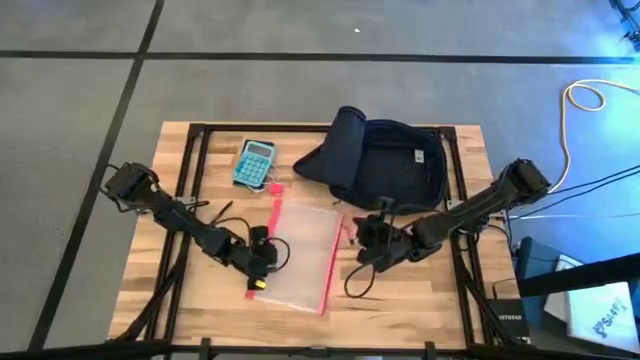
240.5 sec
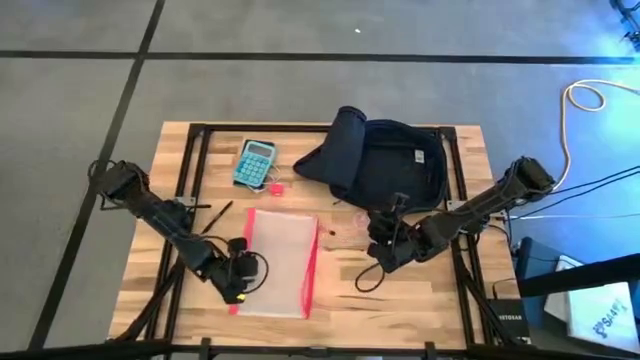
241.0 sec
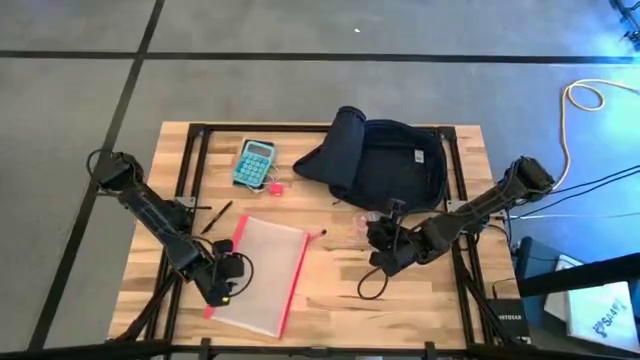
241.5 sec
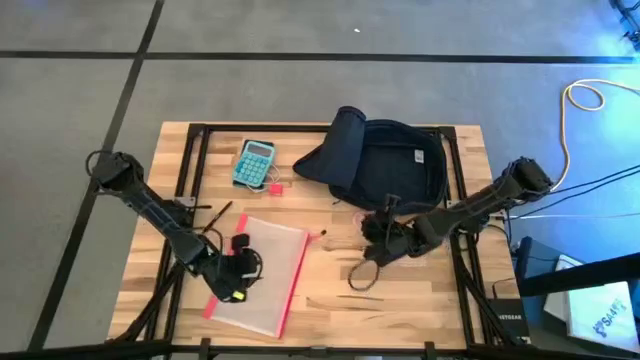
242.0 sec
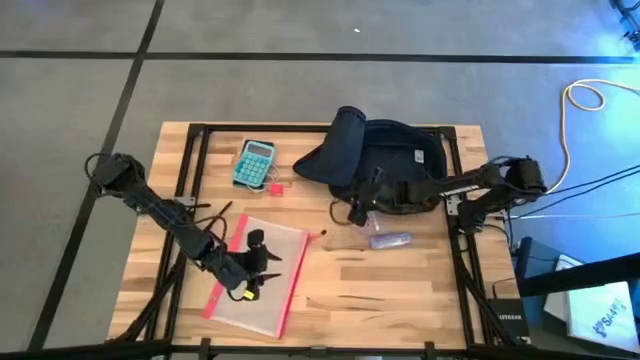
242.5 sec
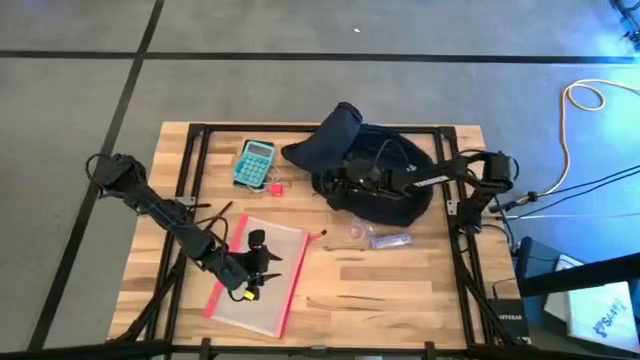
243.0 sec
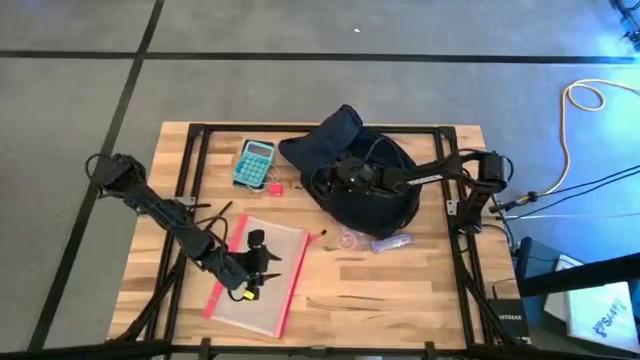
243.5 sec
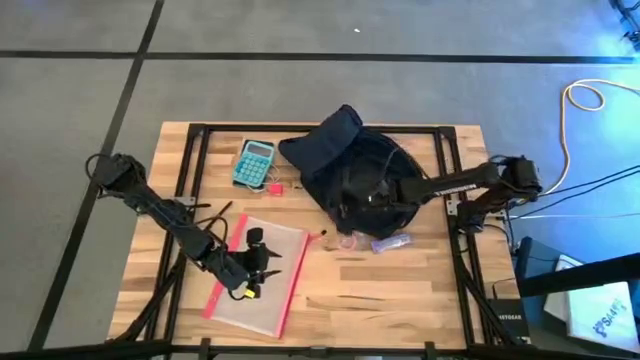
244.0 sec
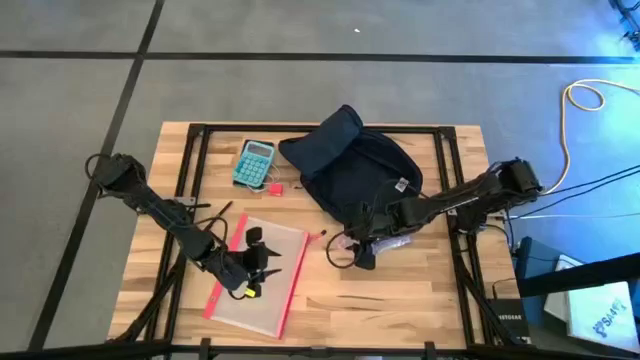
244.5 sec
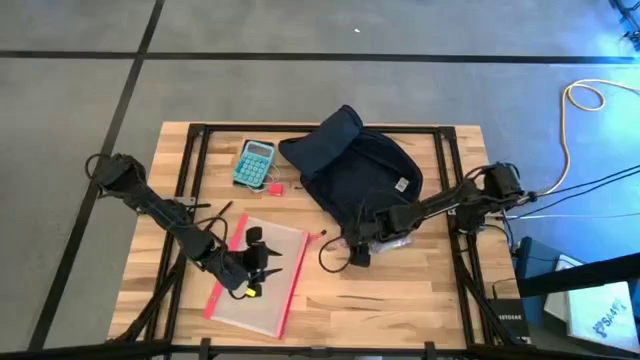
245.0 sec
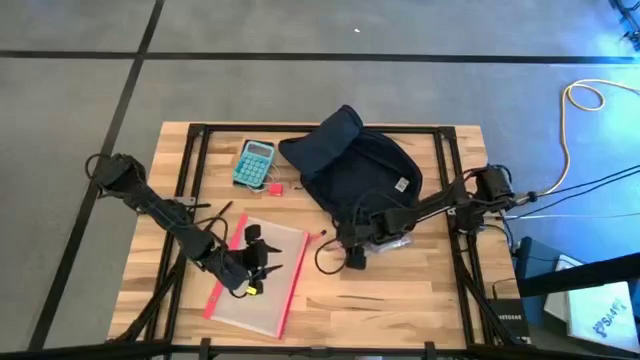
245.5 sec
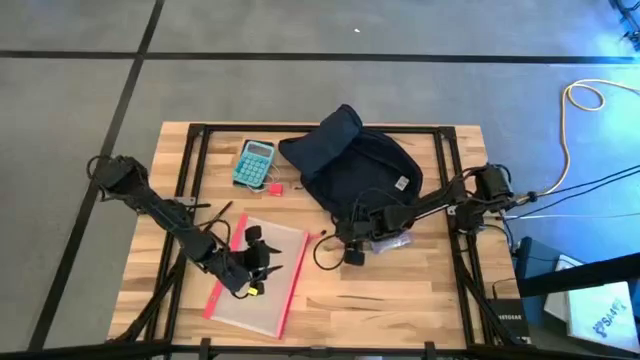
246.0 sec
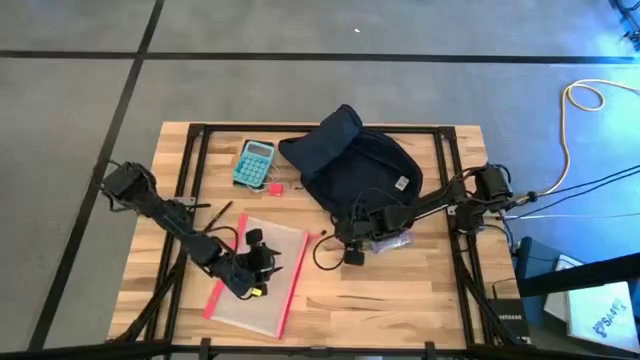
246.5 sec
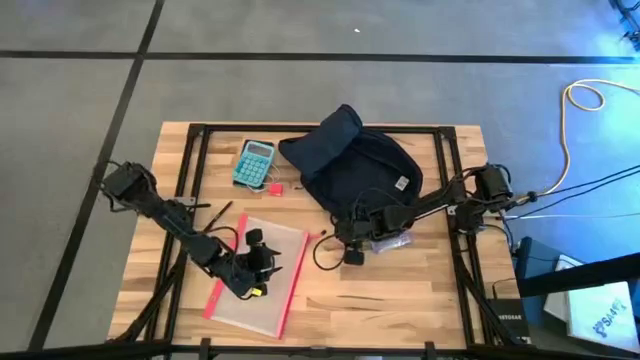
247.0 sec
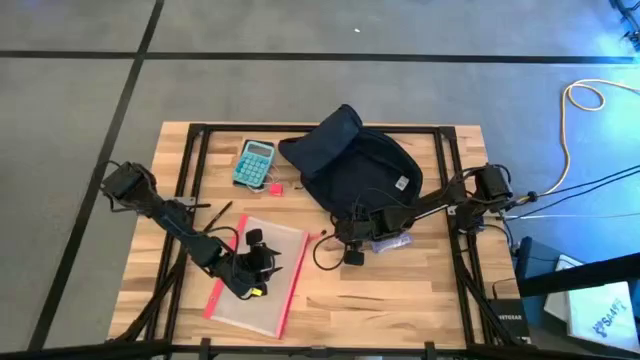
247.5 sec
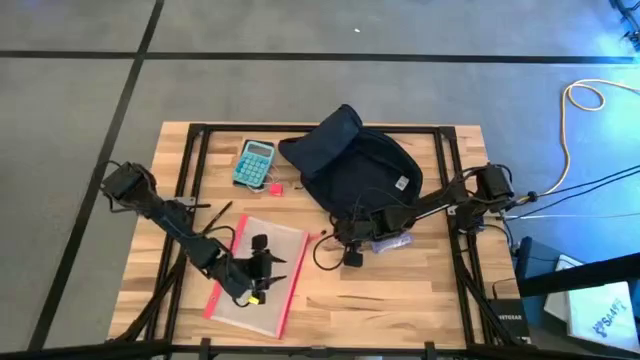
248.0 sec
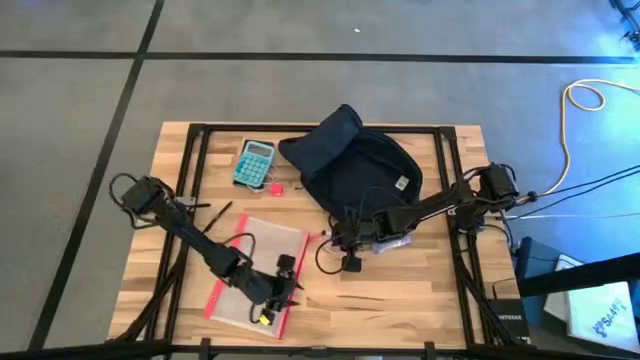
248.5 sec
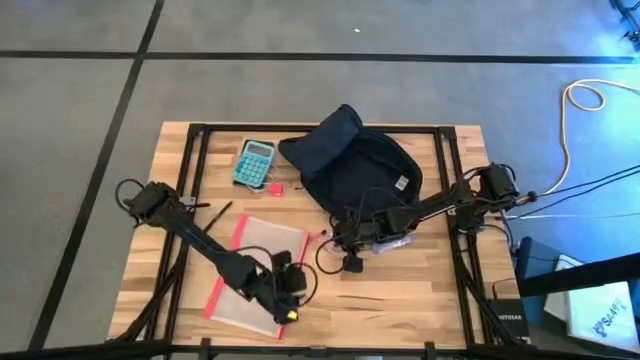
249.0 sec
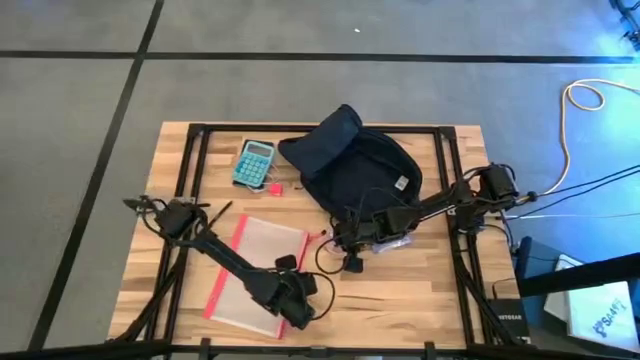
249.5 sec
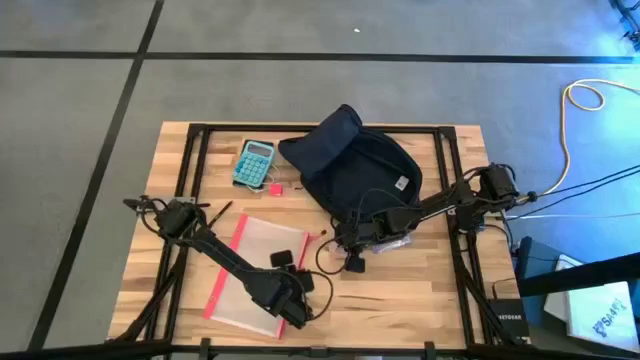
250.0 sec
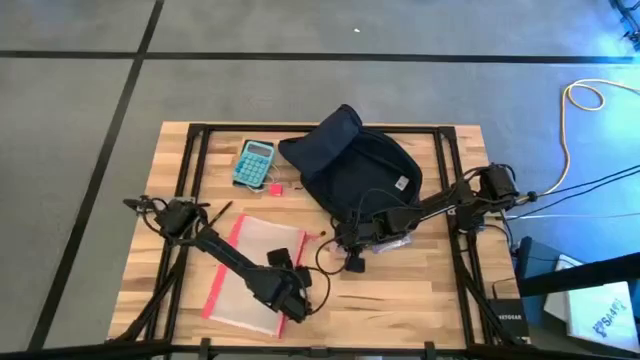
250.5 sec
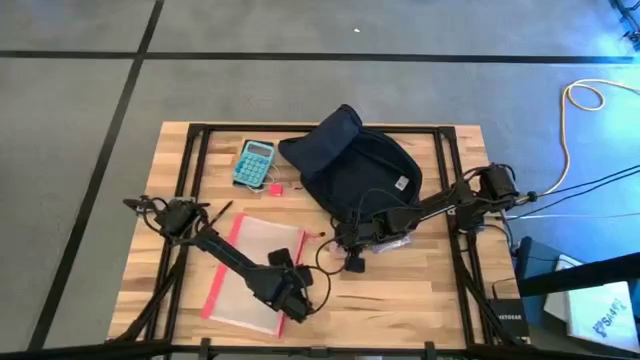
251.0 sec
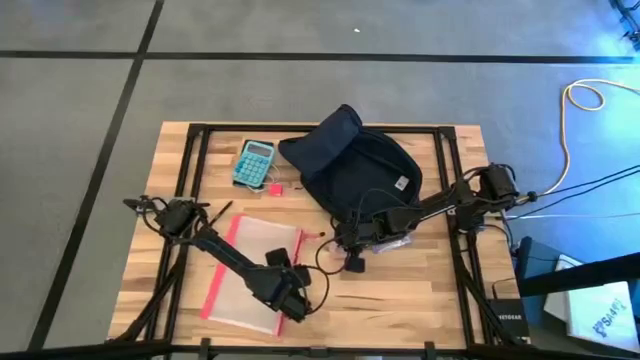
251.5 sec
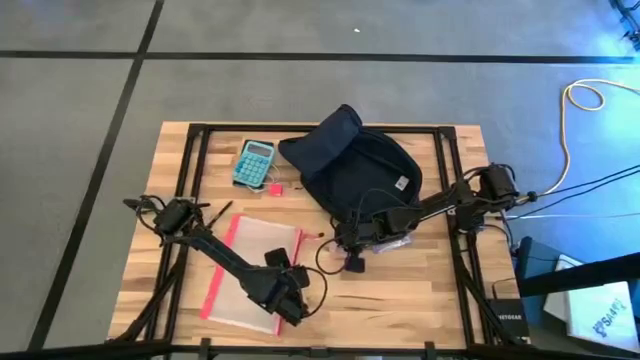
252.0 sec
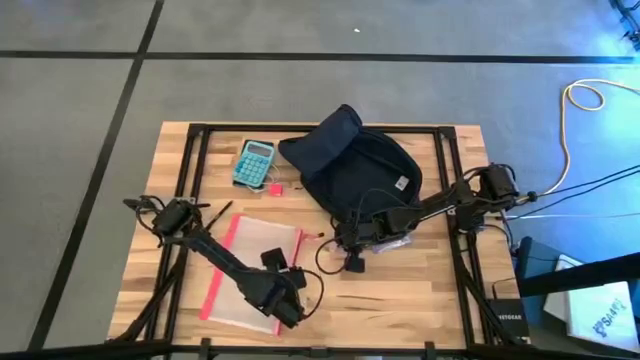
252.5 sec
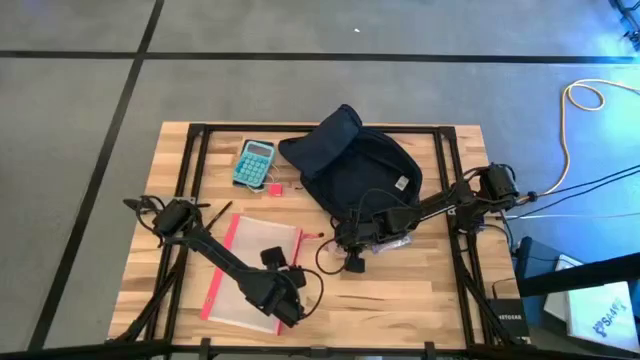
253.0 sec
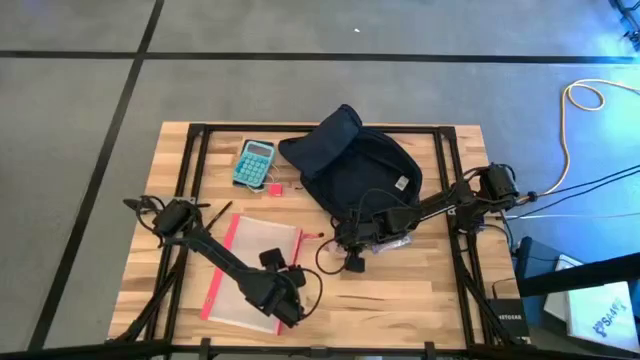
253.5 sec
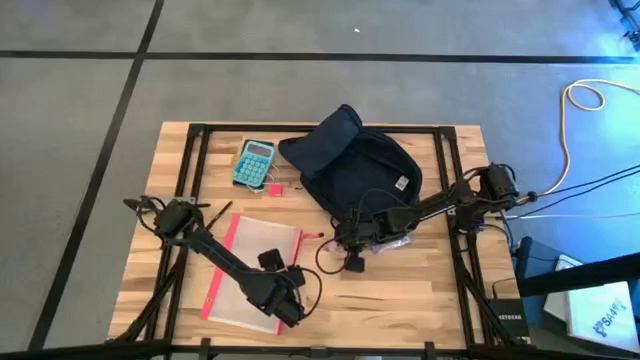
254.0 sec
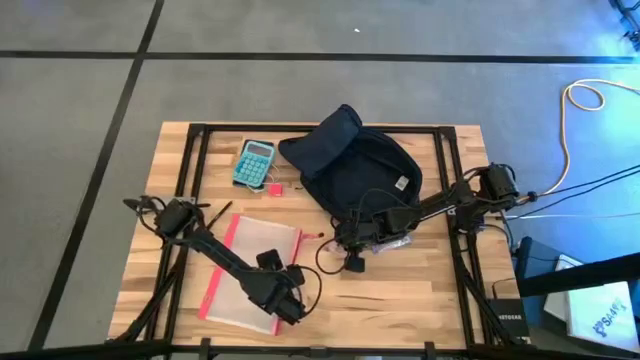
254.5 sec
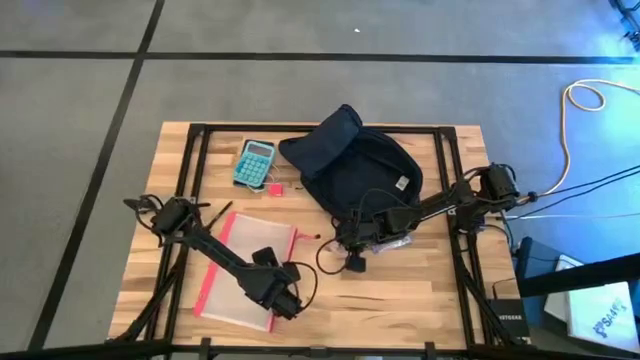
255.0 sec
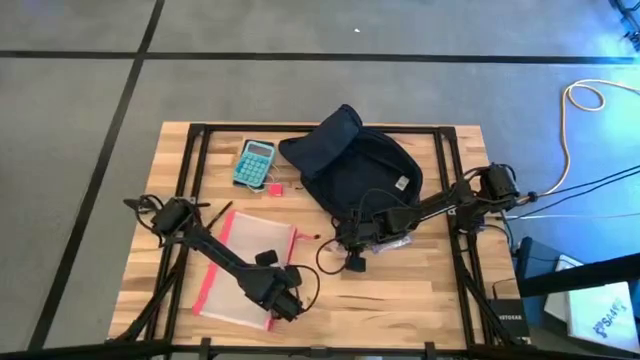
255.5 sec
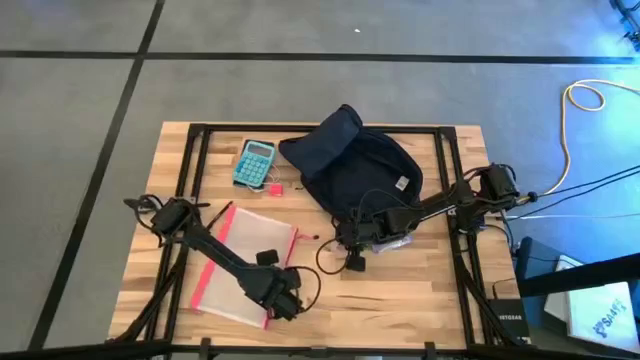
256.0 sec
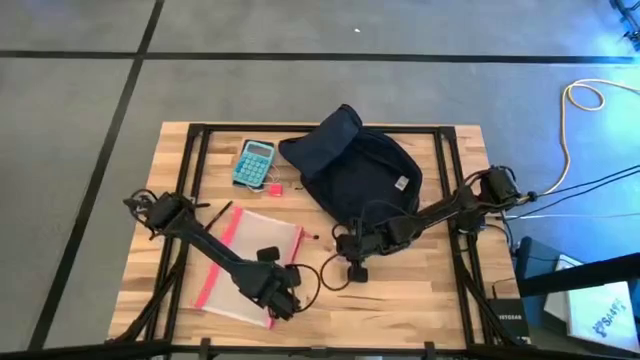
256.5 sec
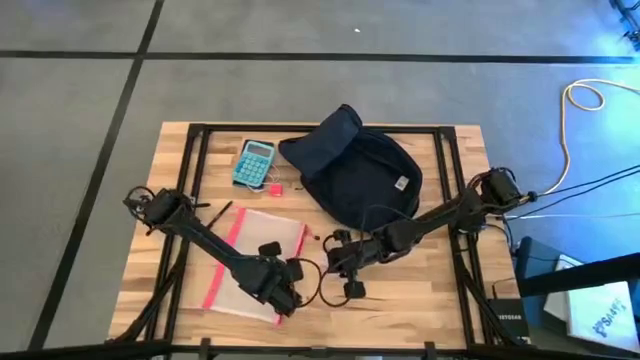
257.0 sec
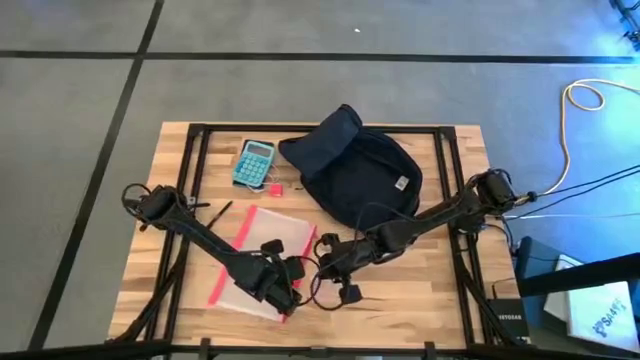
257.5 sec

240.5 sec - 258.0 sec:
Task: Unpack backpack
Put the pink earphones into the transparent zip bag

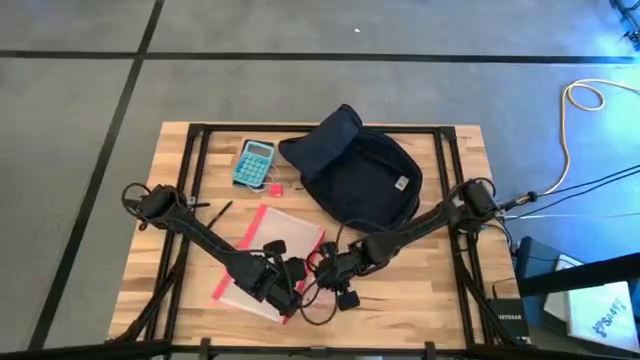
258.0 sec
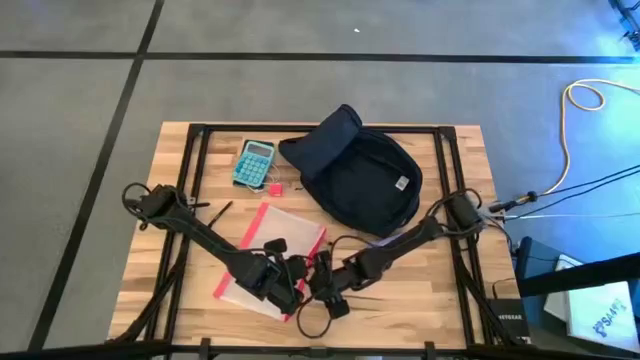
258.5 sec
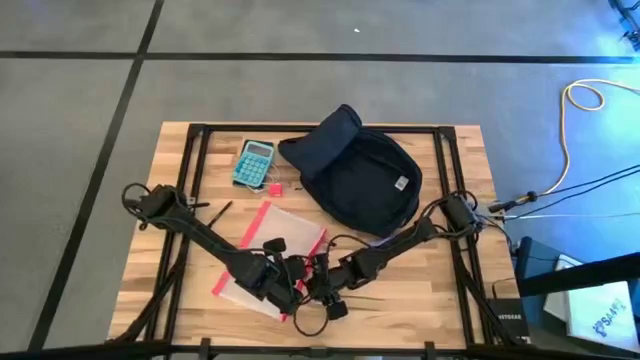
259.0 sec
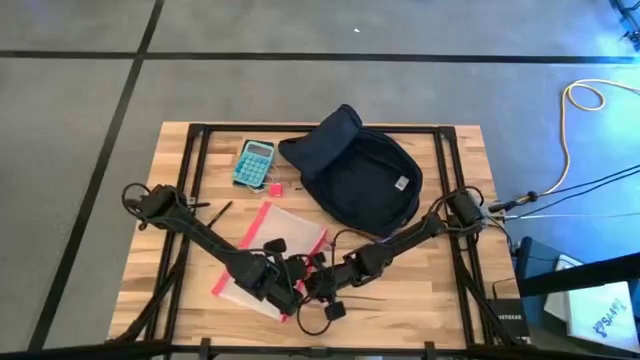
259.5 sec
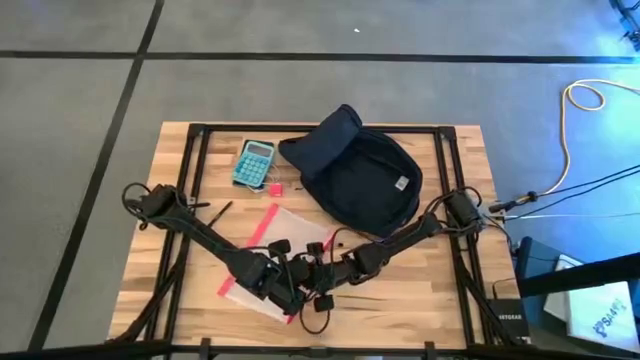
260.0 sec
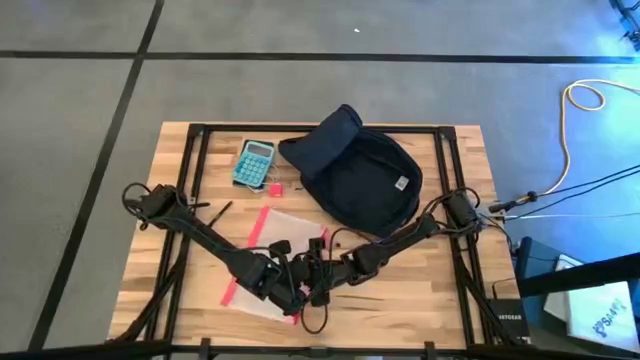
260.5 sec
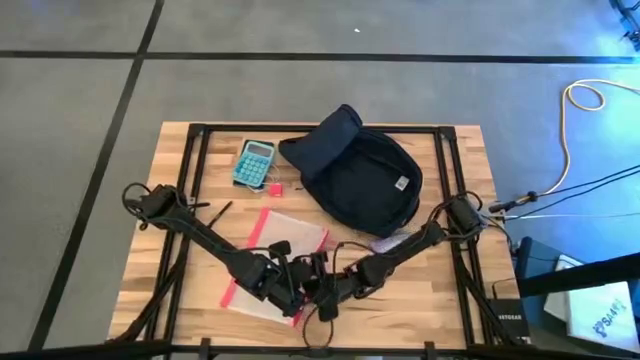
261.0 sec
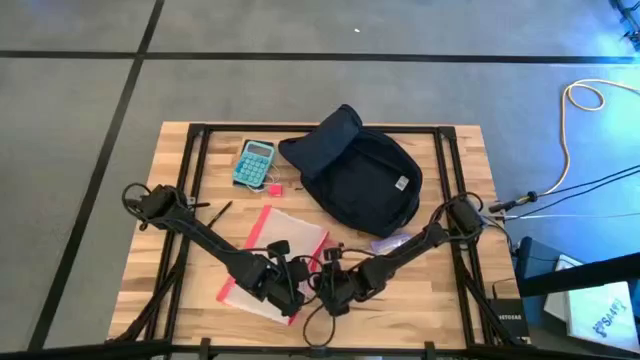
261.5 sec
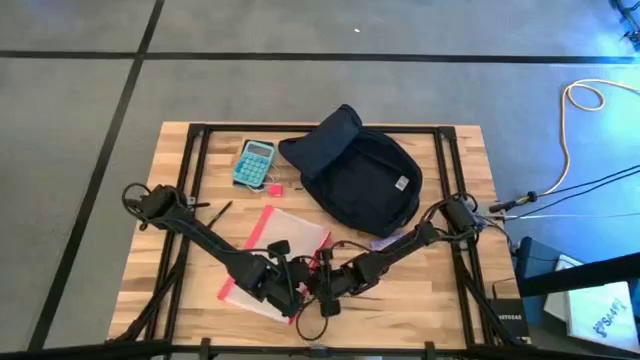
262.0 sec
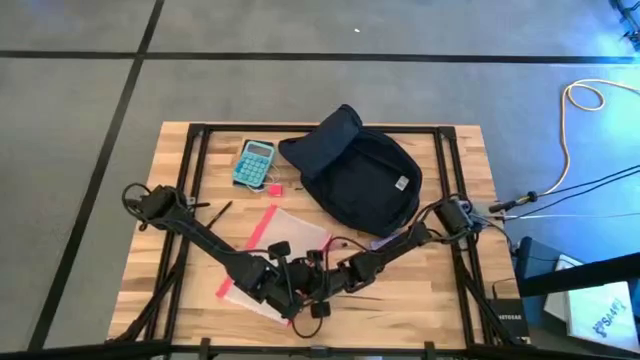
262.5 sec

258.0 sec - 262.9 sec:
Put the pink earphones into the transparent zip bag
